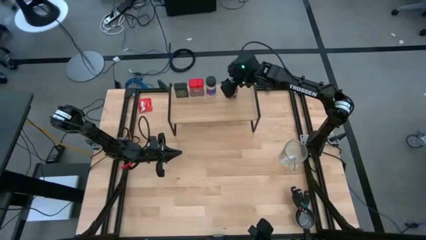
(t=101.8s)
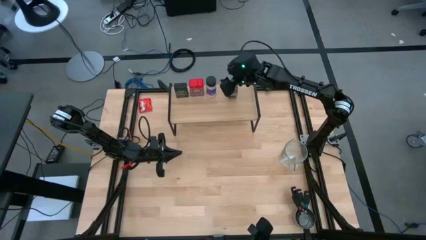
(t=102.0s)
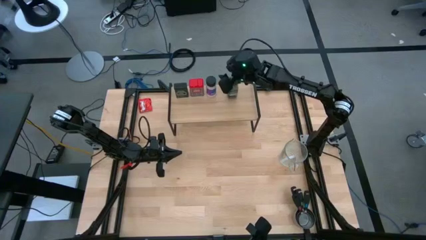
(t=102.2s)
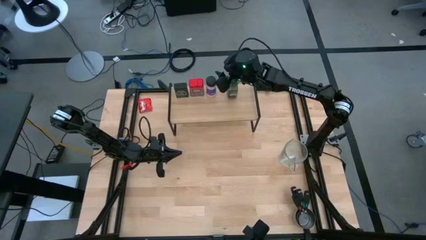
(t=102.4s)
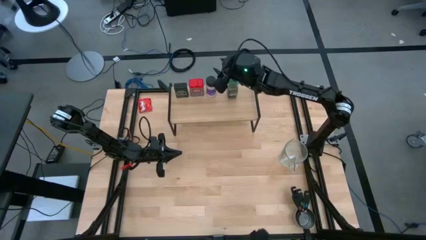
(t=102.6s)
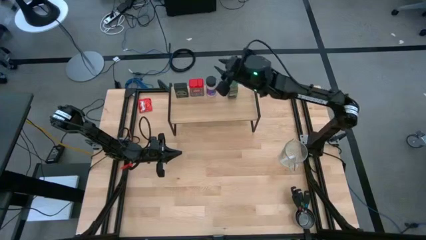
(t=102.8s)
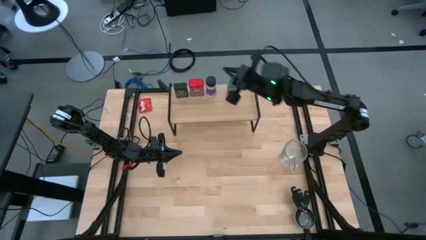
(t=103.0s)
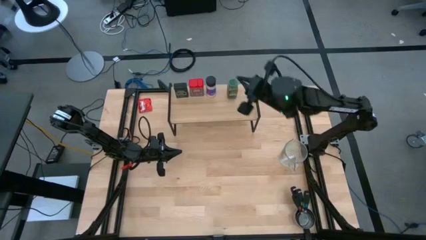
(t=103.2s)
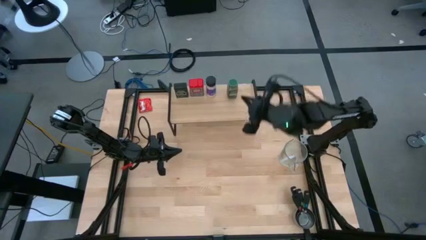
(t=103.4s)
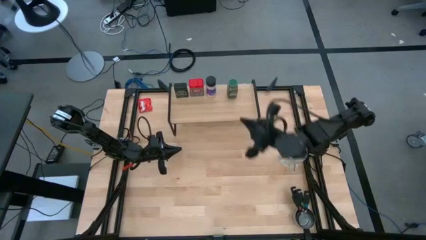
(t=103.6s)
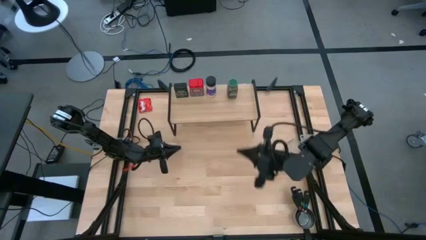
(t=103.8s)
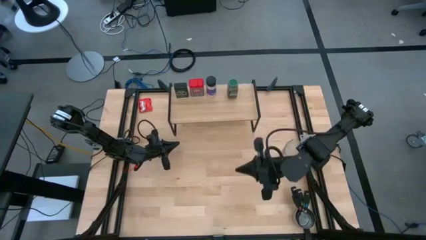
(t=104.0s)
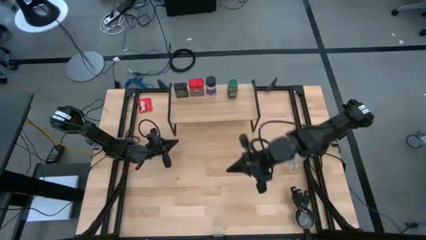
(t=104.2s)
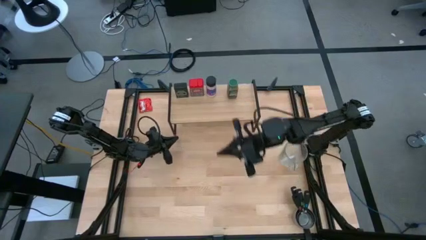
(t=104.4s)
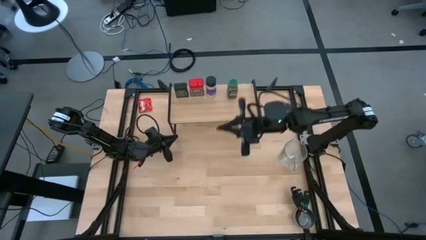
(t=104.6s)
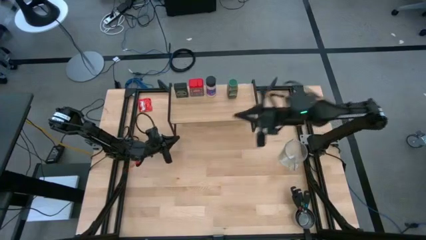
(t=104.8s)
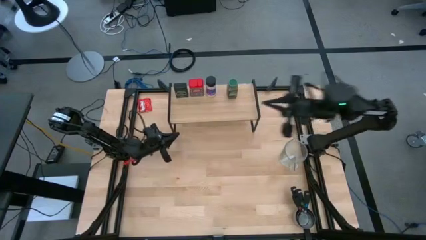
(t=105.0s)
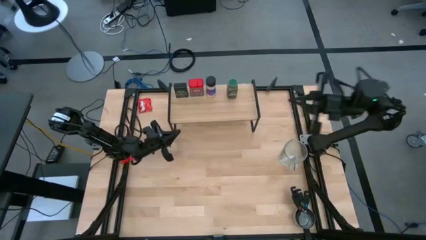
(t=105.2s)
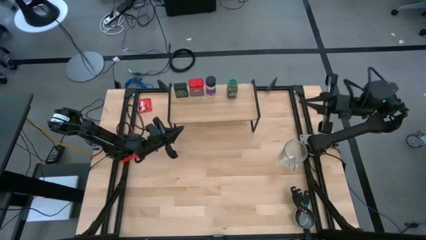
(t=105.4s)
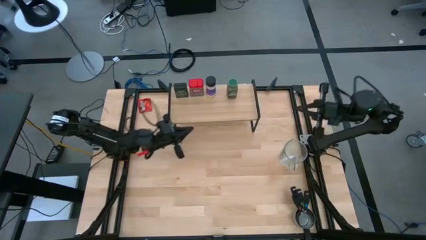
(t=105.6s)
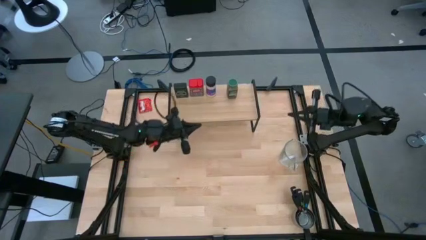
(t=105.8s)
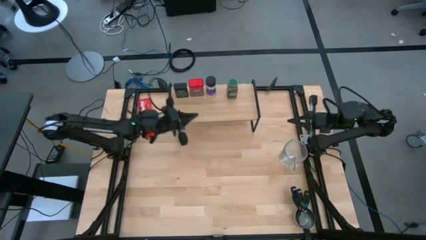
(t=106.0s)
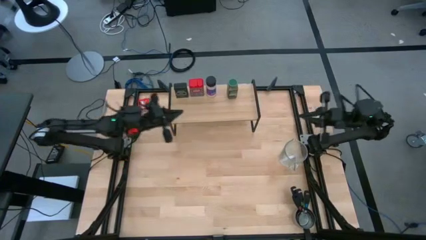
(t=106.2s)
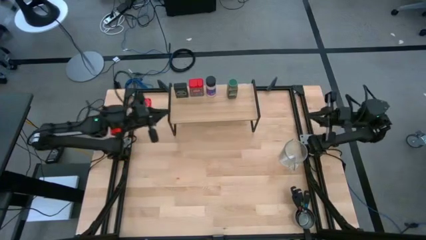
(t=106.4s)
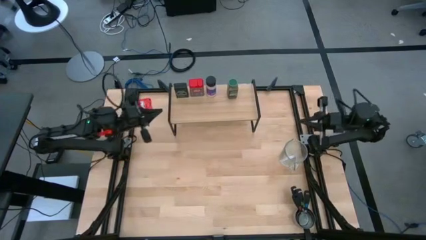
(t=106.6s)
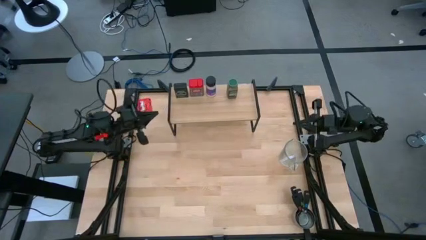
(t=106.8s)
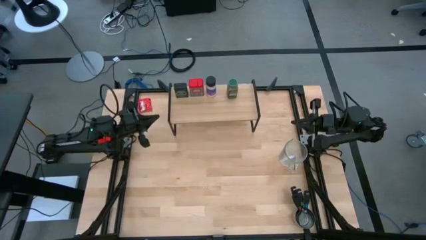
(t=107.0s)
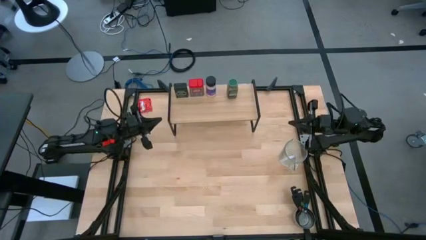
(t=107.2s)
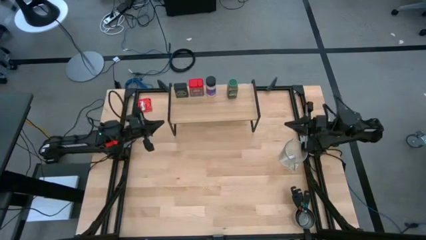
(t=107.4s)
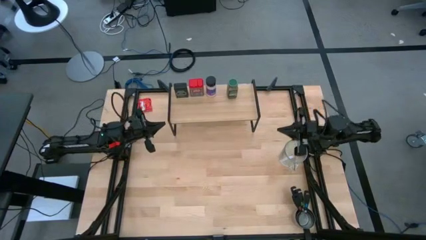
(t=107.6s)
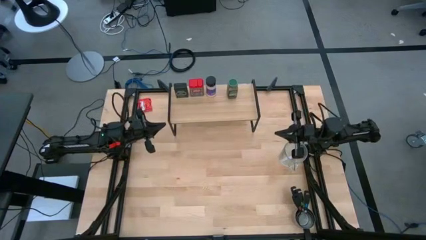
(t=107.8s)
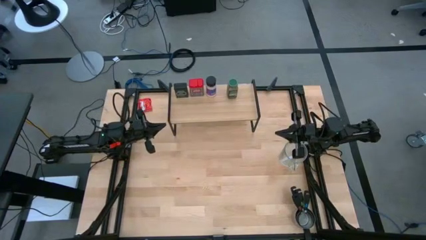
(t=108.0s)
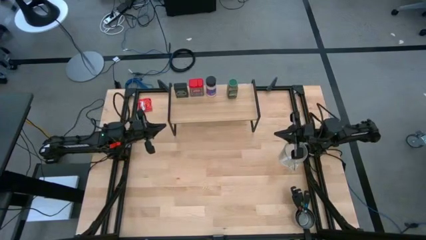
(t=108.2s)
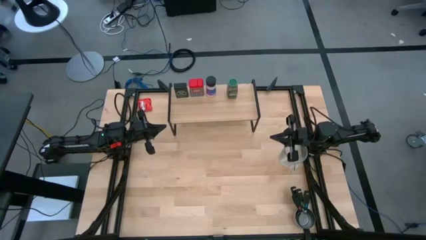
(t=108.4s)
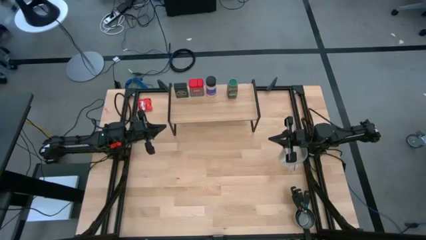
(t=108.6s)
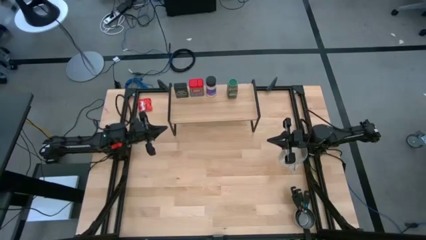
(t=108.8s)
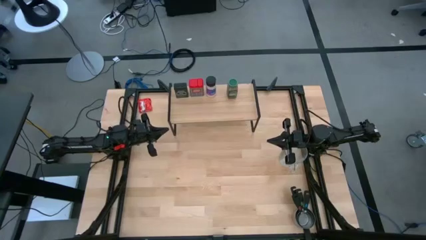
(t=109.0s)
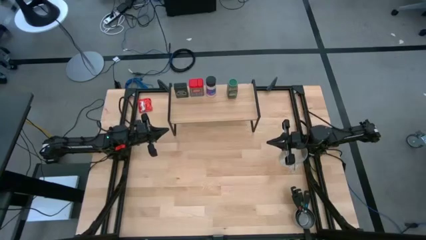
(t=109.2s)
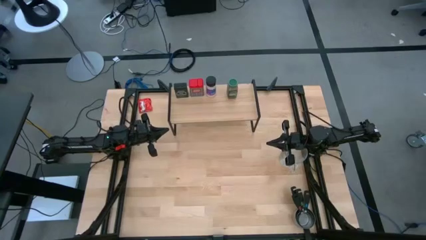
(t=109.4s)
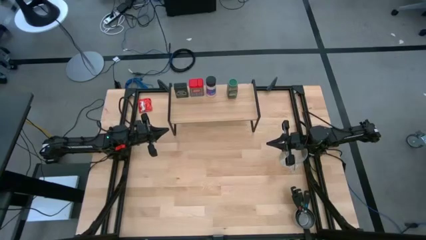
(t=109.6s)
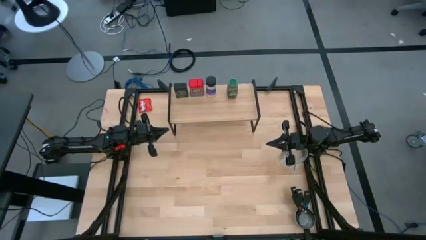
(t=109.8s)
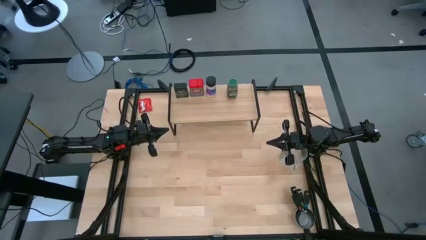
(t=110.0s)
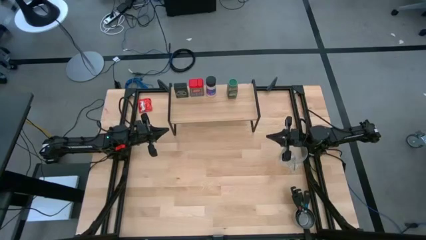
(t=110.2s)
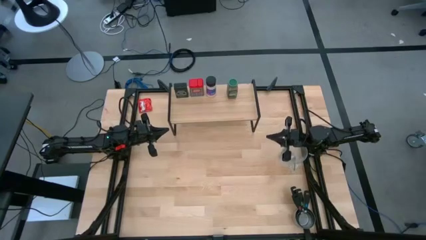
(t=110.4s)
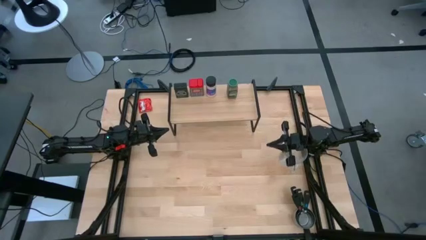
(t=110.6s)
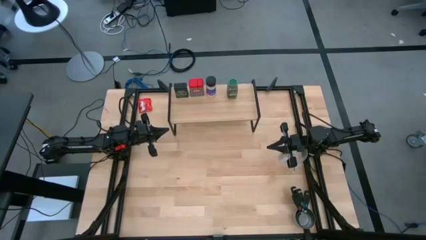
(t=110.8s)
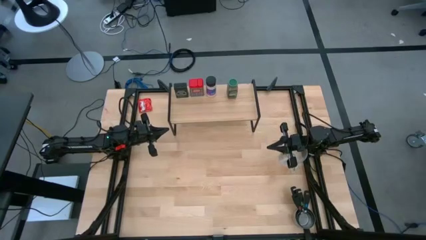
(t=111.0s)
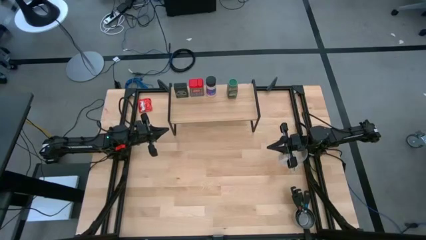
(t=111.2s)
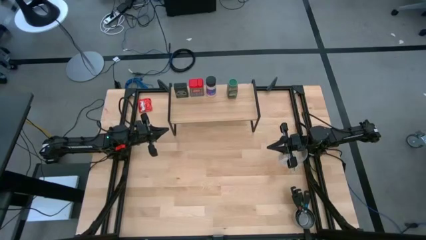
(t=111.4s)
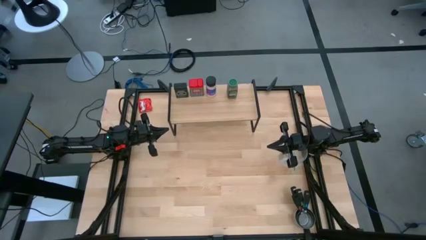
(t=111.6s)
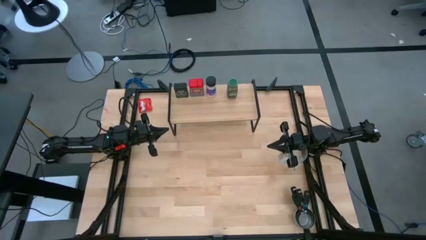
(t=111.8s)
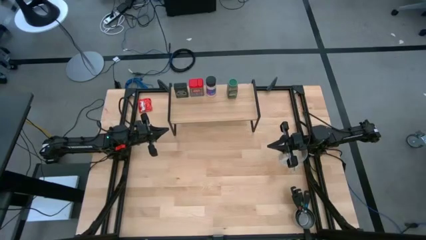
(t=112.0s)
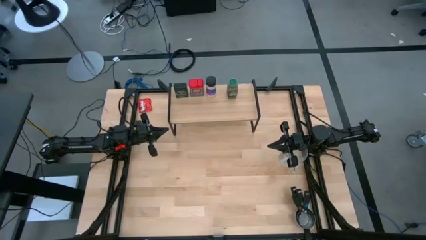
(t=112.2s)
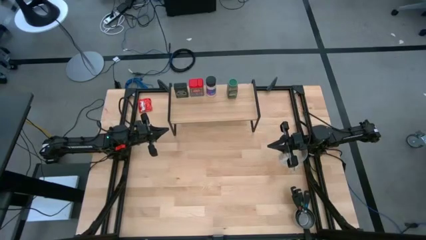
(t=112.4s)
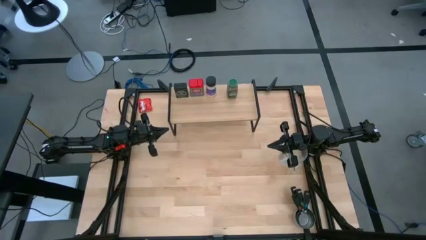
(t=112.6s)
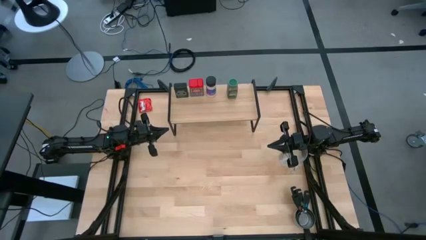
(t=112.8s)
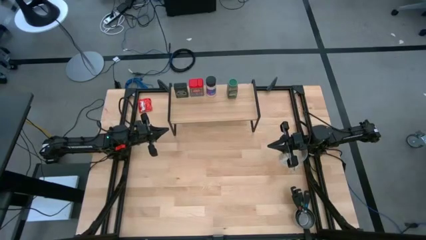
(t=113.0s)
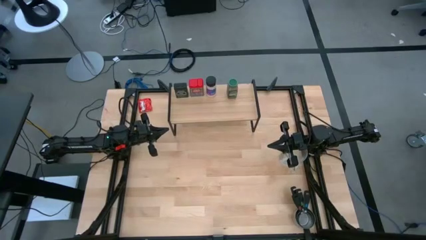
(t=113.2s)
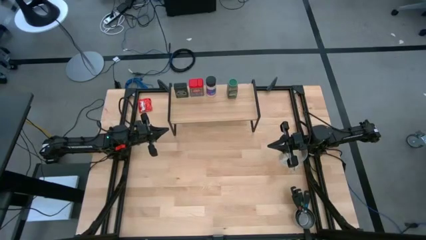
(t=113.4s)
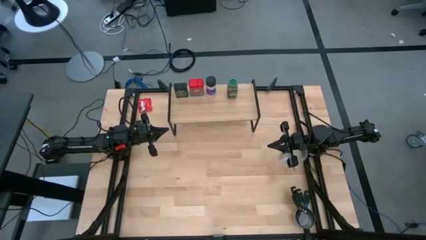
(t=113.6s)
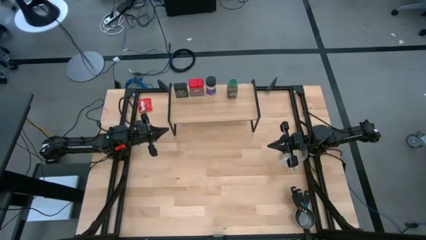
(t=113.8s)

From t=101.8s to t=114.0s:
Task: Shelf spices
Return to Home Position

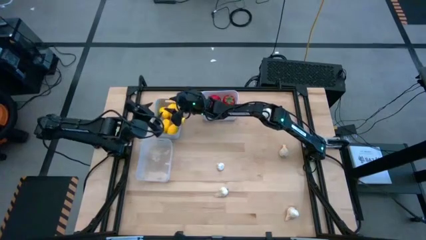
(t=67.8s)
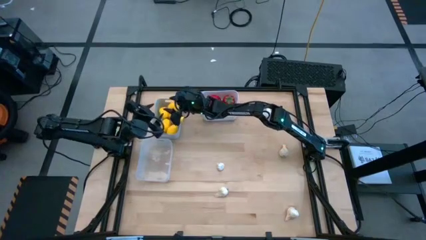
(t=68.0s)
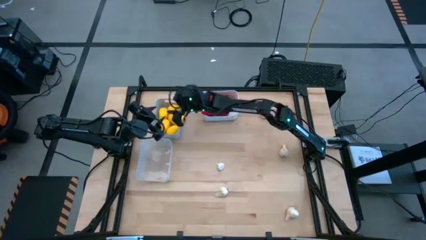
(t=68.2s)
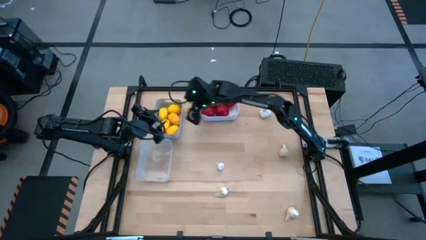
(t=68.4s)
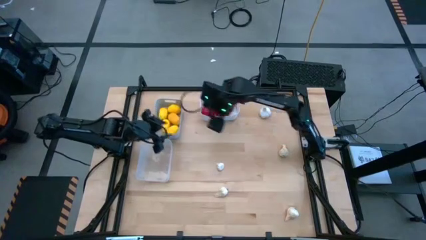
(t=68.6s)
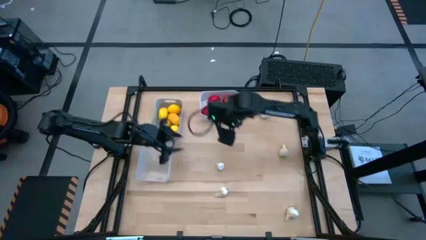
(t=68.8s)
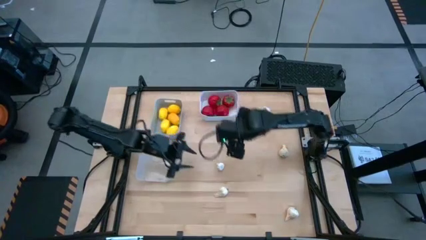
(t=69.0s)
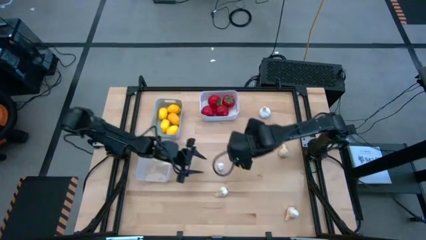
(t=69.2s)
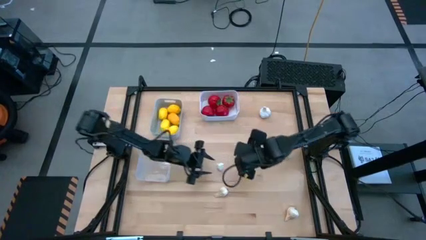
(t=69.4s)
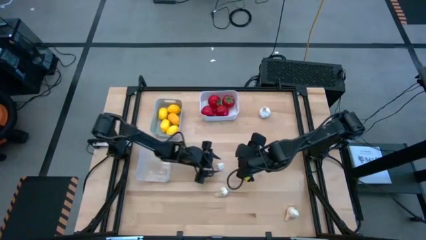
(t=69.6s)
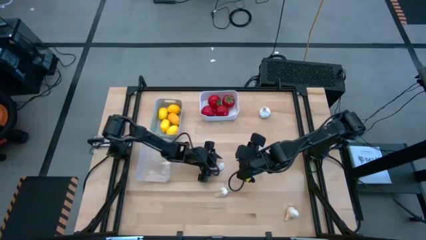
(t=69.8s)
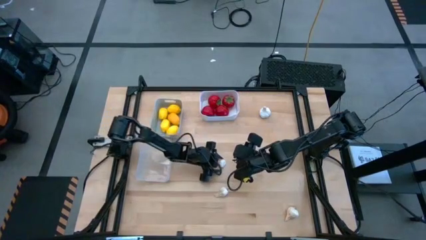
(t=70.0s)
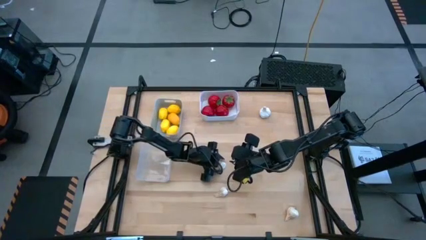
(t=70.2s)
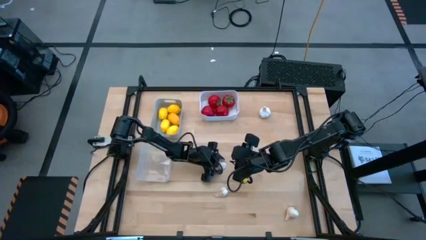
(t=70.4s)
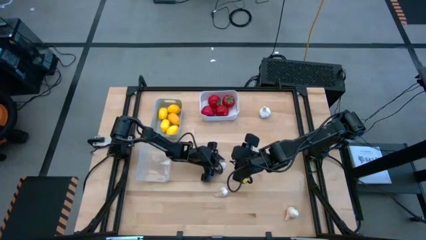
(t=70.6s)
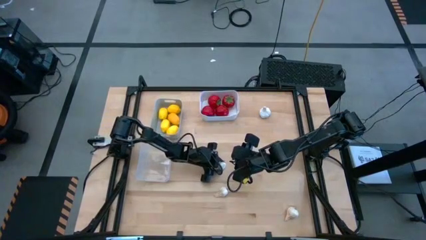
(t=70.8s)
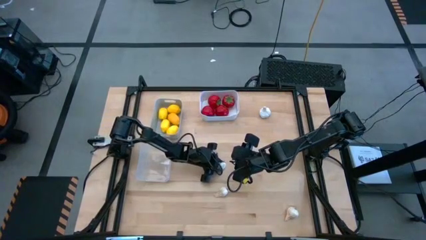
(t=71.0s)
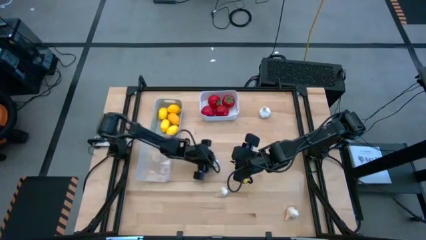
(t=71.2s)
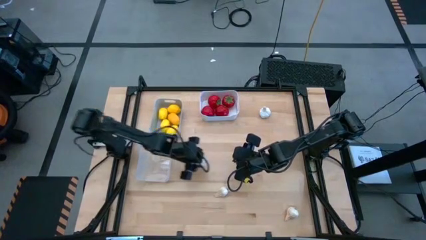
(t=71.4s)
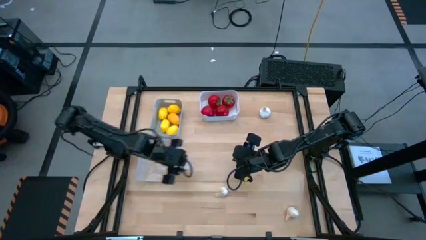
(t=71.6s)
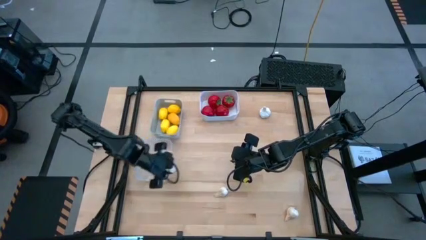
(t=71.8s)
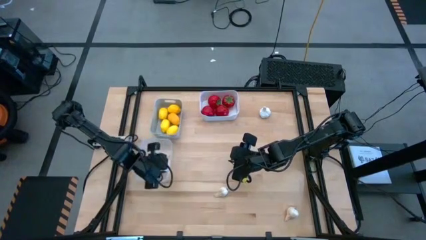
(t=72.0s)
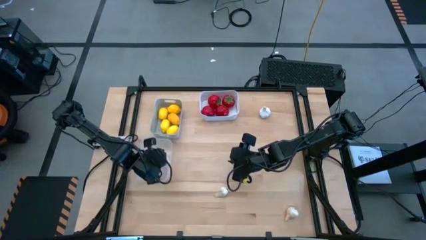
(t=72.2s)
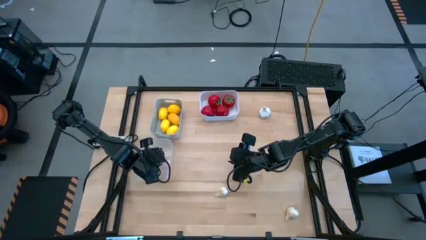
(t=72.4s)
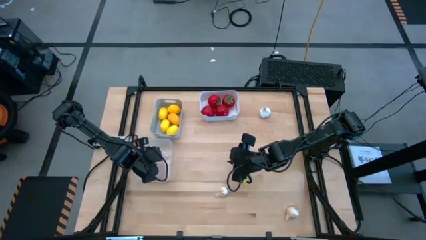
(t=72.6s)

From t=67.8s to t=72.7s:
Task: Sort produce into baskets
Put the white garlic into the transparent bin
